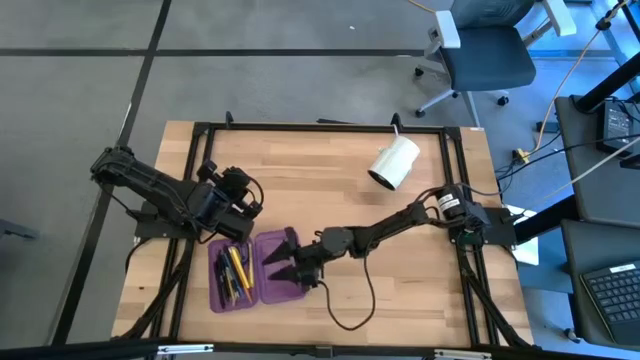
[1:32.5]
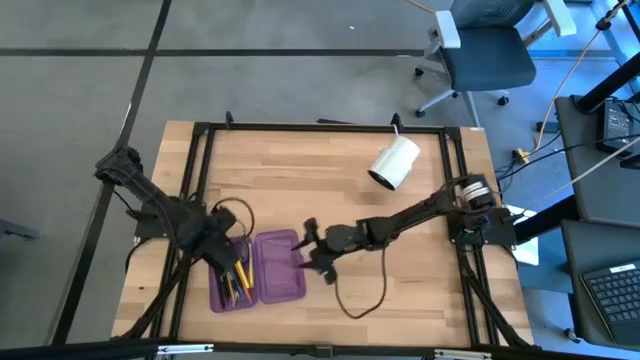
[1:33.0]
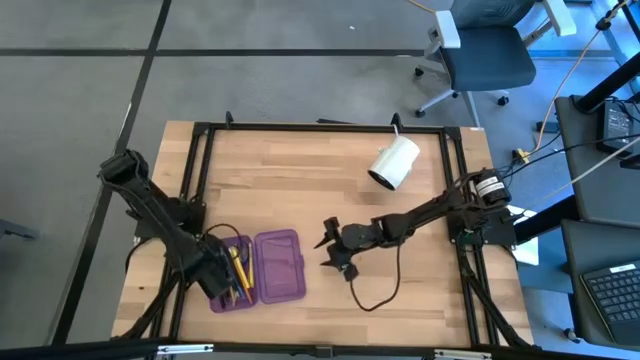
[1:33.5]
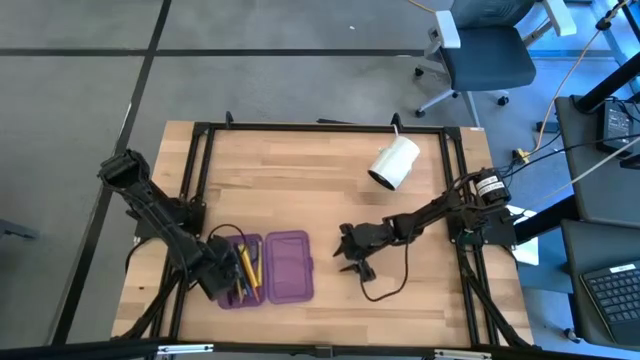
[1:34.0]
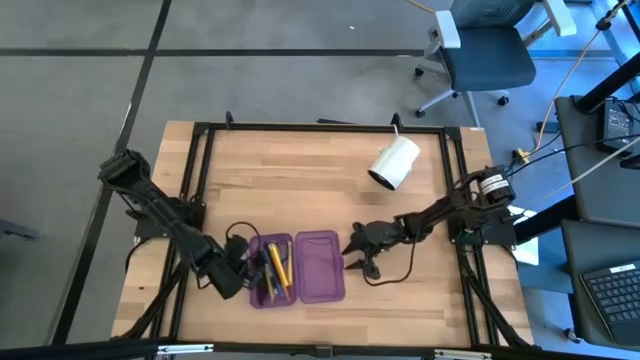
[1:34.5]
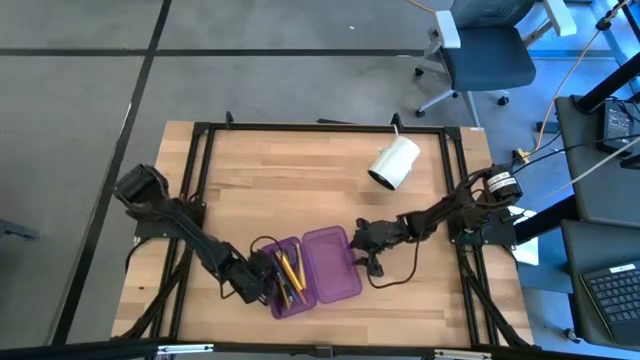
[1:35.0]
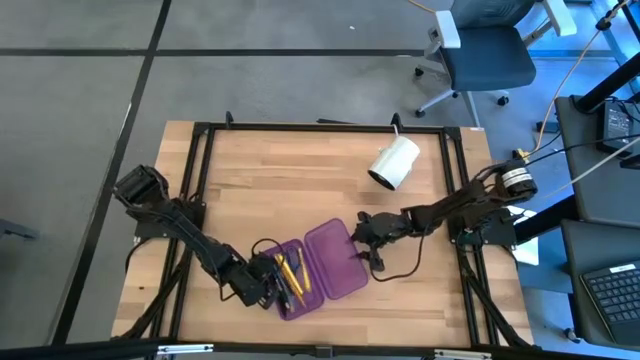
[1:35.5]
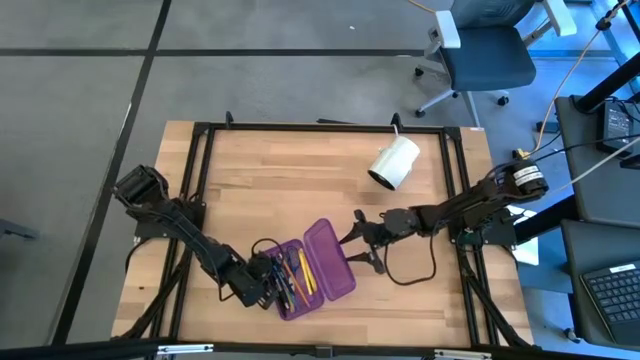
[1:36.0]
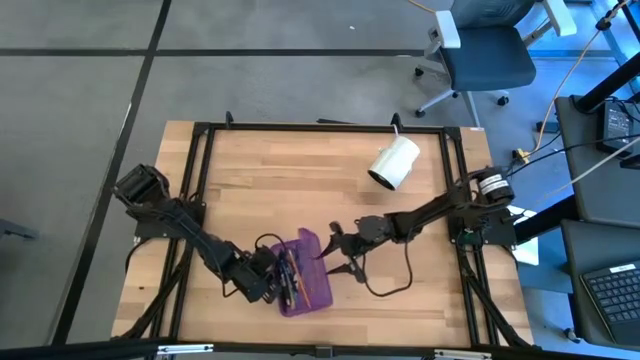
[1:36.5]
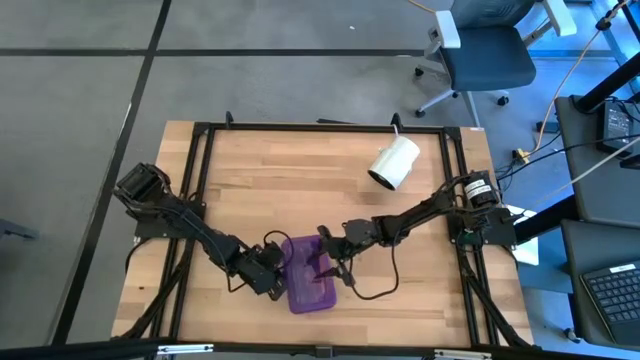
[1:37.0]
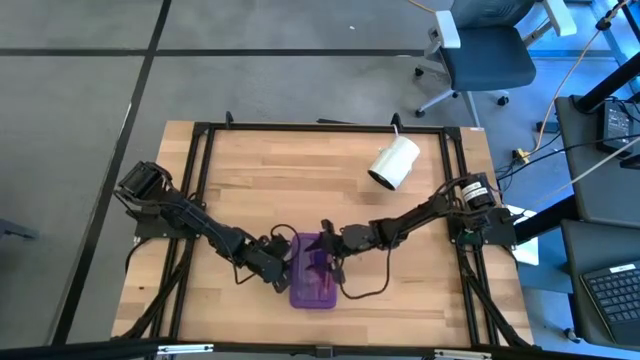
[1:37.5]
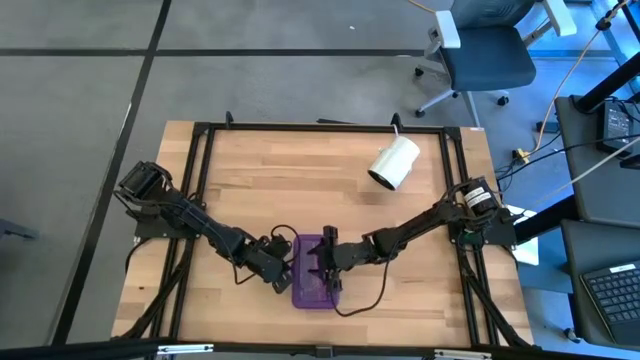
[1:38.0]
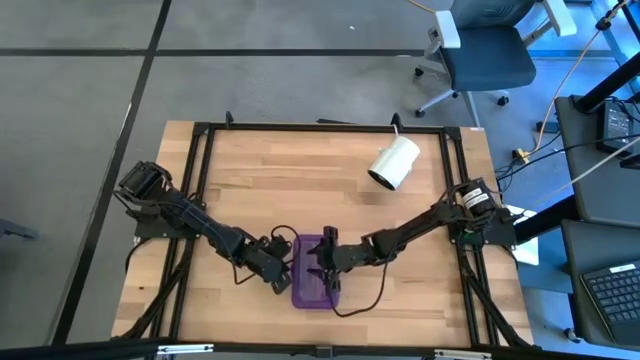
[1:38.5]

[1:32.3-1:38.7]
Task: Pick & place school supplies into a supply box
Close the purple box organizer

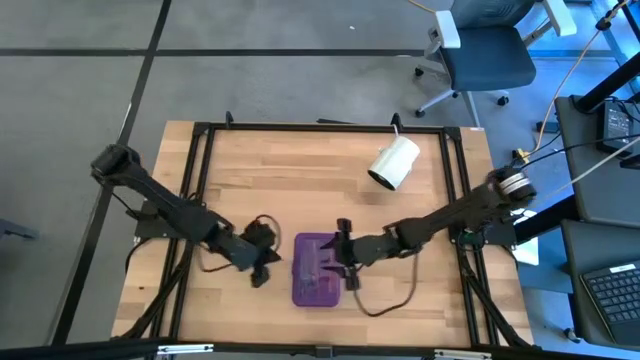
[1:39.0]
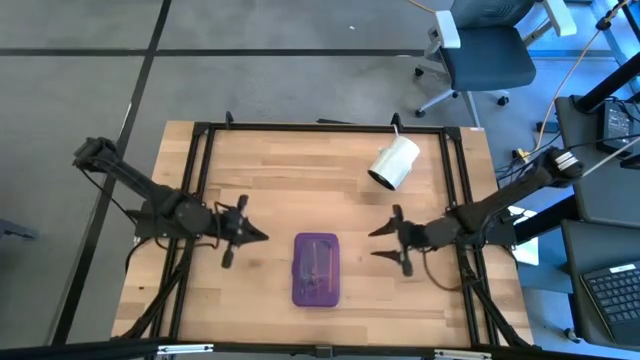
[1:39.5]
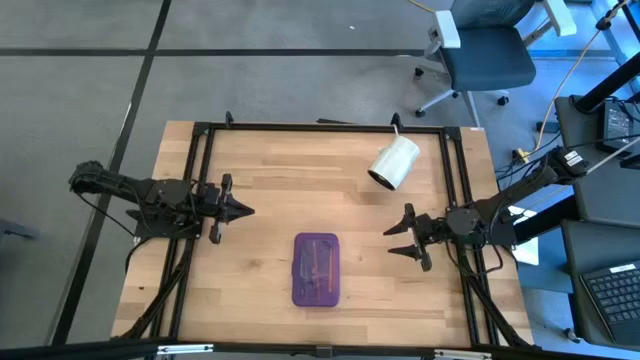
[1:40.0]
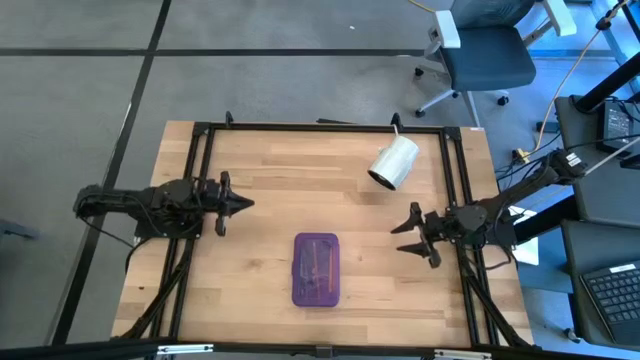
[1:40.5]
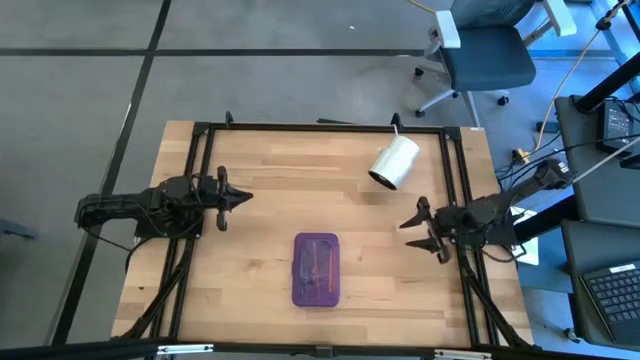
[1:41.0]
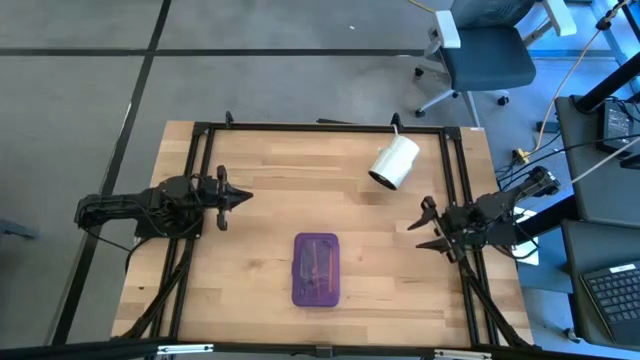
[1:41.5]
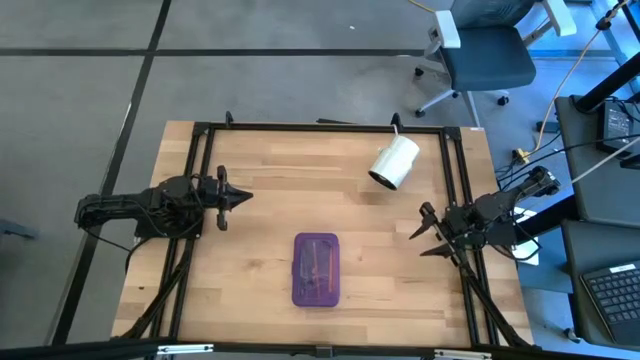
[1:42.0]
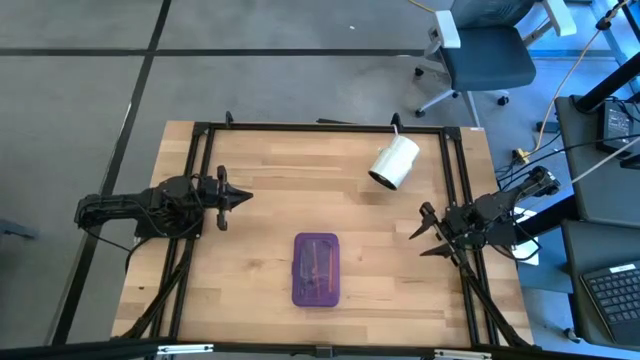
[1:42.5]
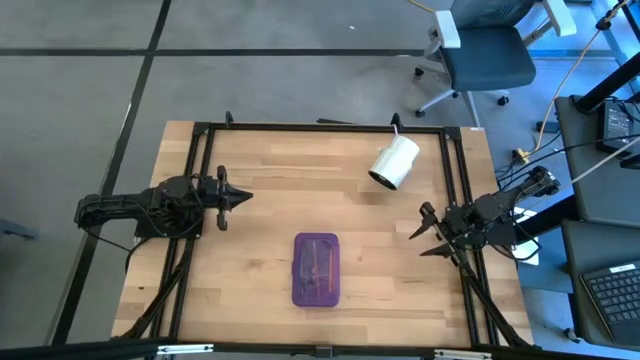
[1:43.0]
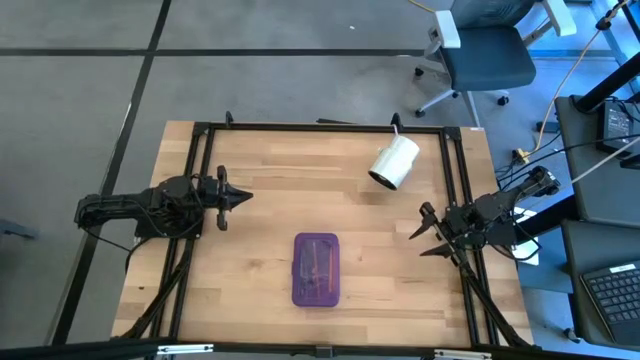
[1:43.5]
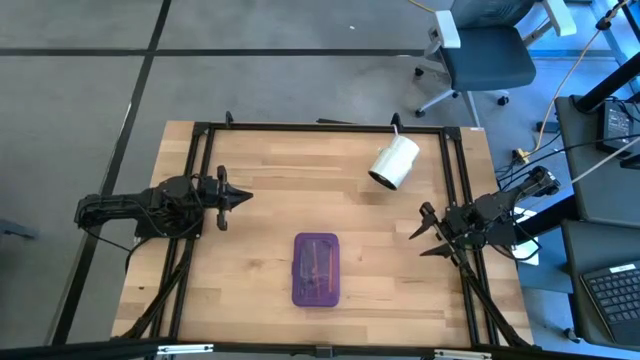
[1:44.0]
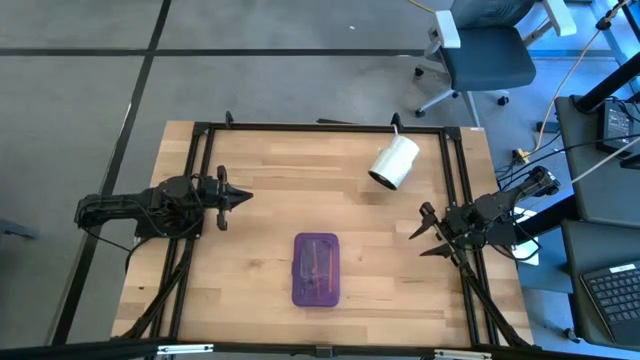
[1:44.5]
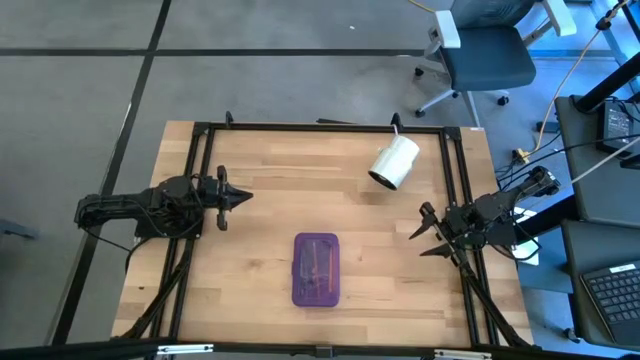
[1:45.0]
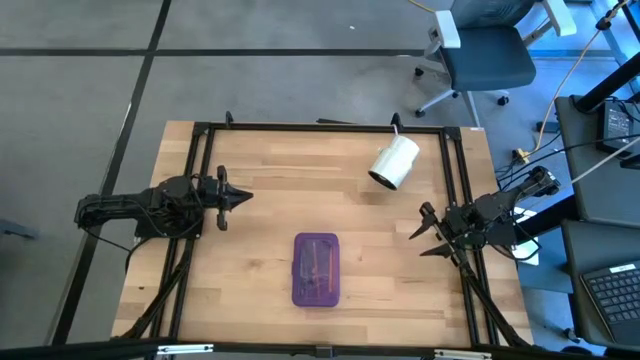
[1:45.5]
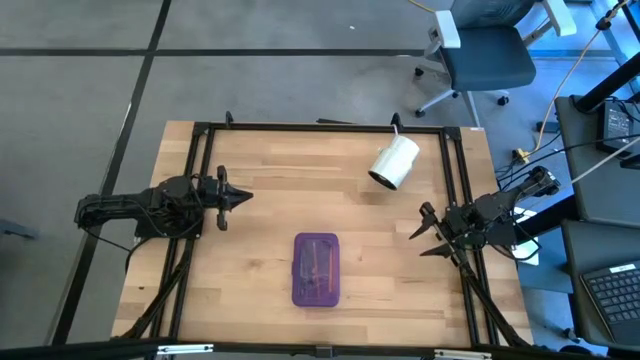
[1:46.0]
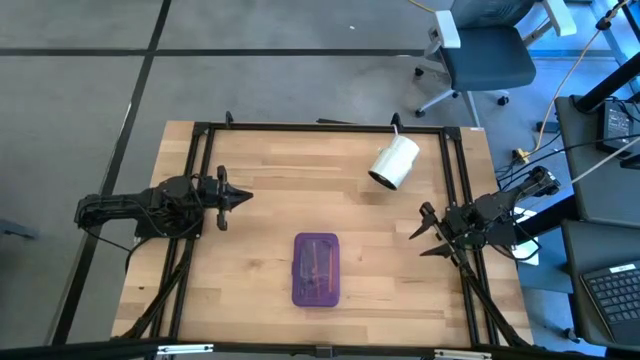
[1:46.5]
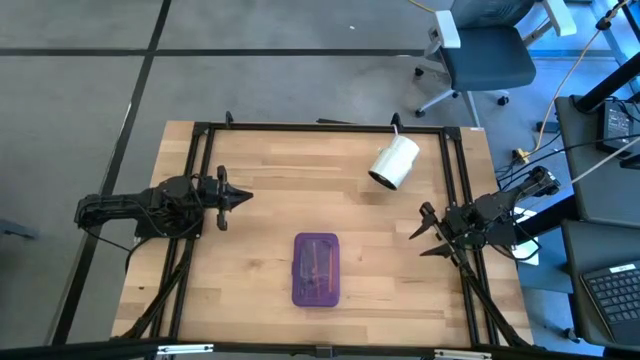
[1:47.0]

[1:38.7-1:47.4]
Return to Home Position

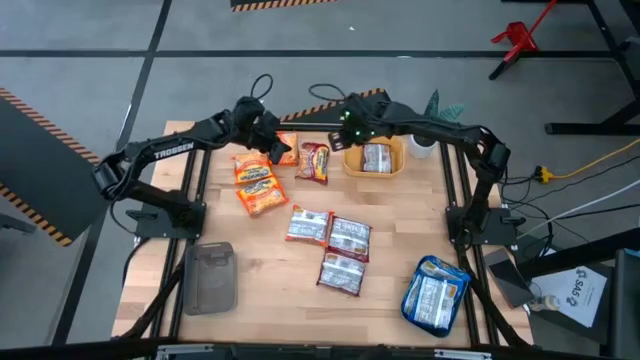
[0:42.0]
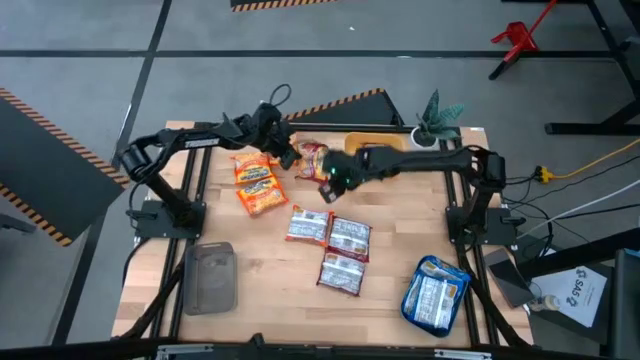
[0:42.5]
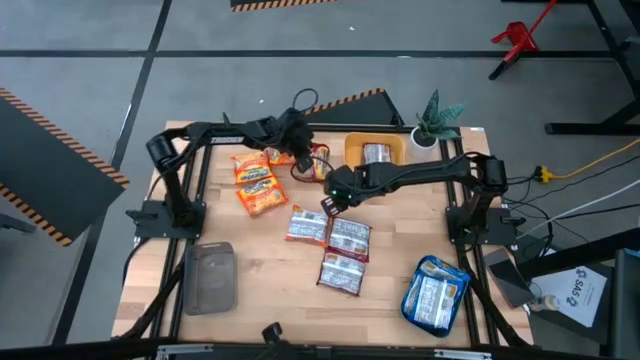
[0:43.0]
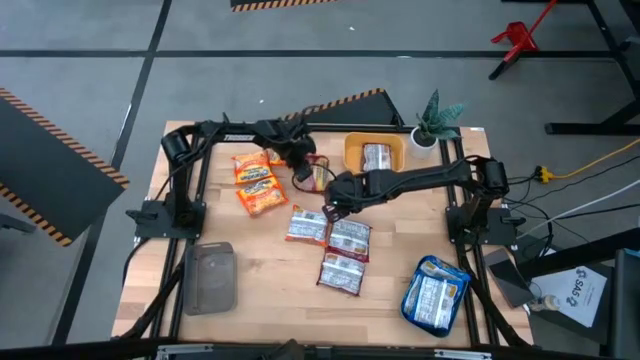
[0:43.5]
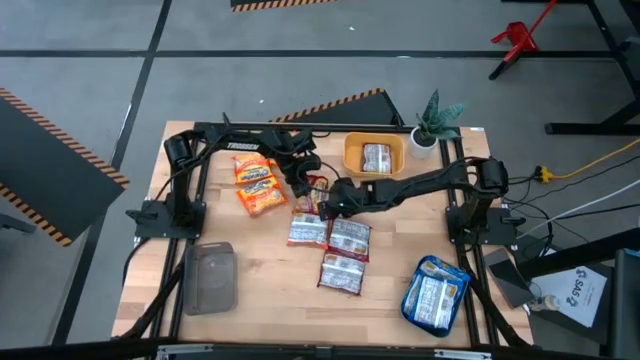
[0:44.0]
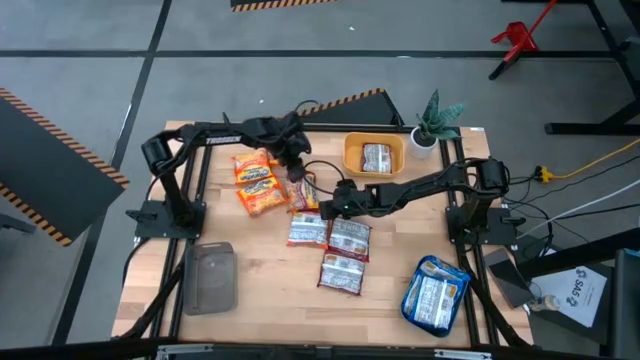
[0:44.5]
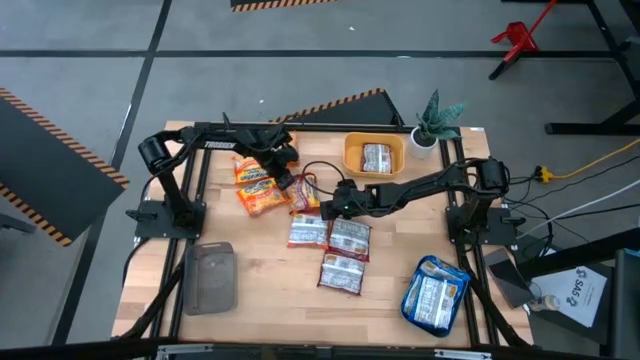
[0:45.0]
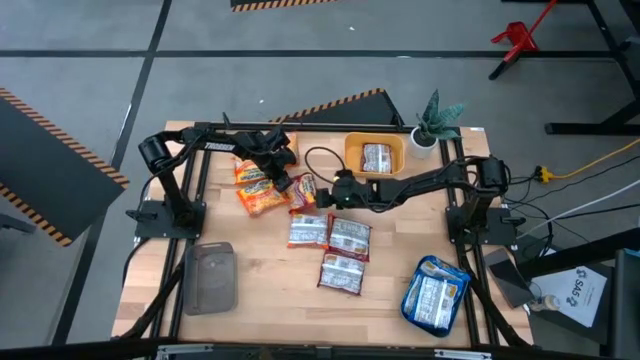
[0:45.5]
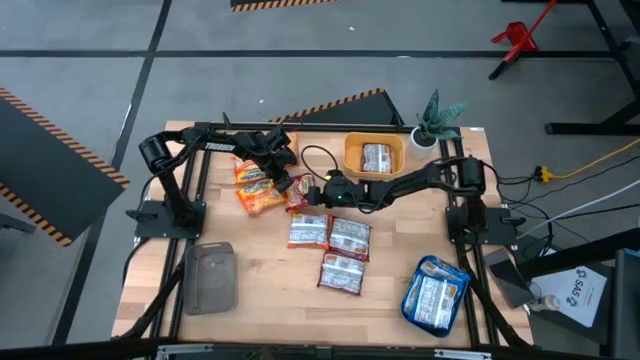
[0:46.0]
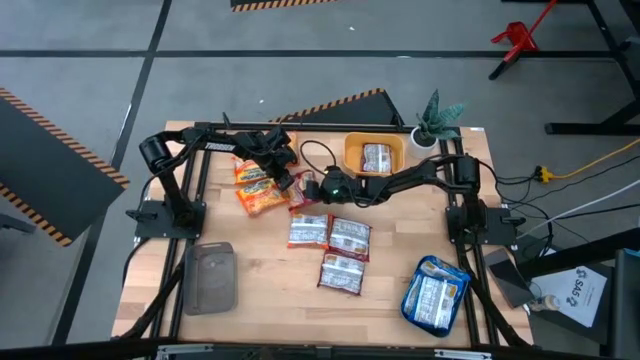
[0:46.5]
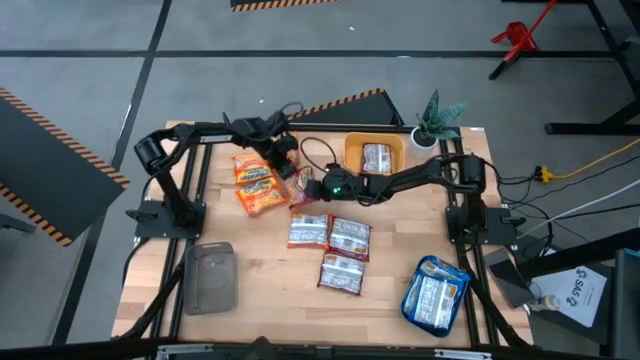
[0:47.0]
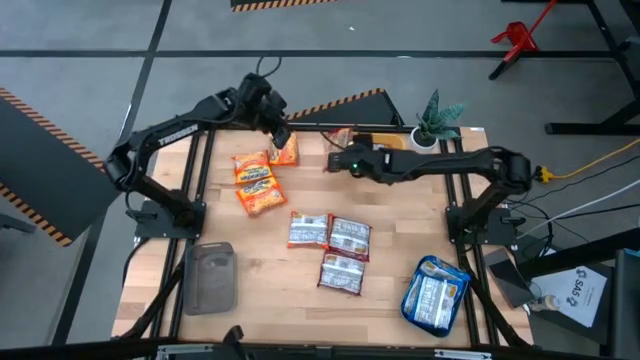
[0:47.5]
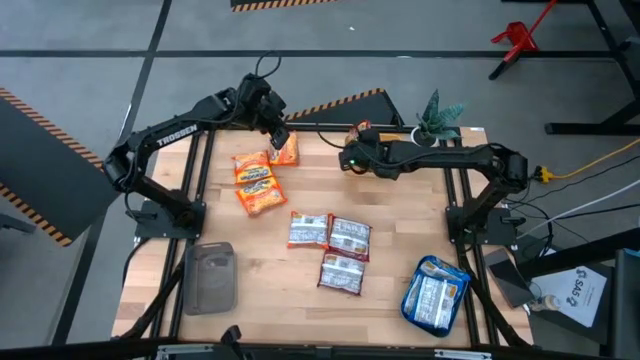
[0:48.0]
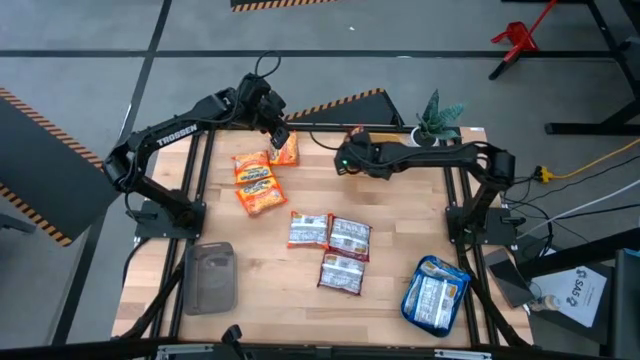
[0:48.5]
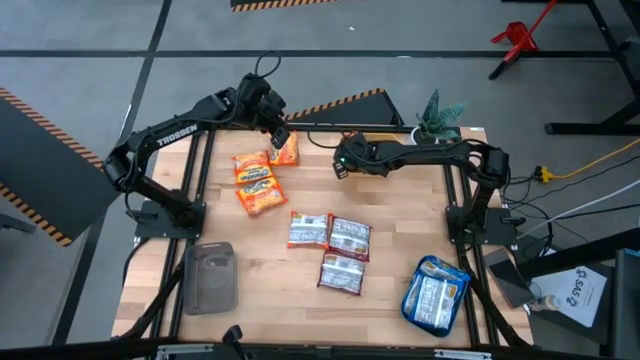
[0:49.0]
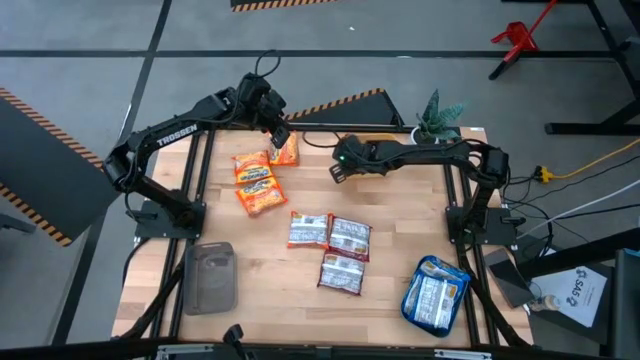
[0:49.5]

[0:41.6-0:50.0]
Task: Sort Maruchan noodles
Put the red noodle pack into the yellow bin
